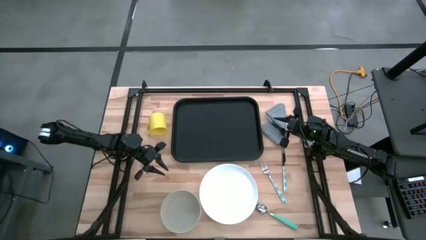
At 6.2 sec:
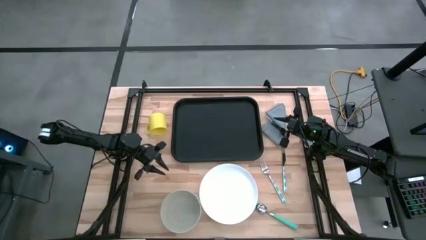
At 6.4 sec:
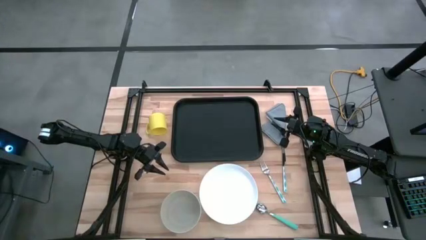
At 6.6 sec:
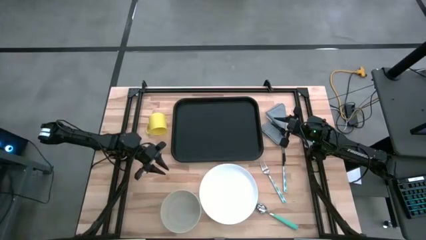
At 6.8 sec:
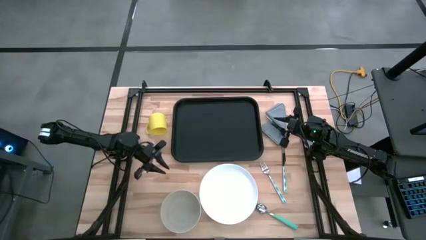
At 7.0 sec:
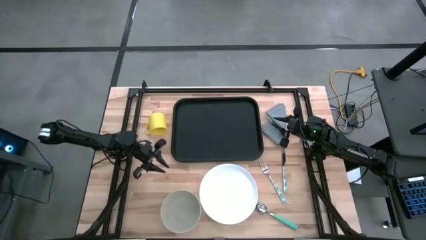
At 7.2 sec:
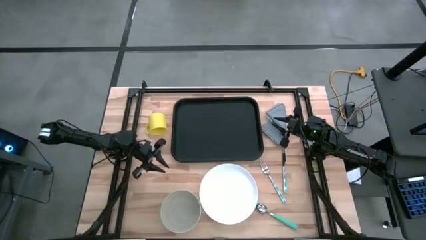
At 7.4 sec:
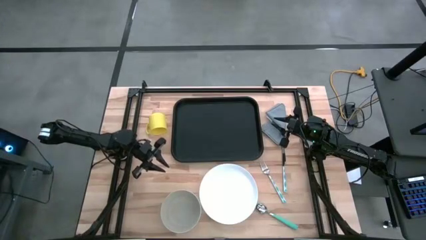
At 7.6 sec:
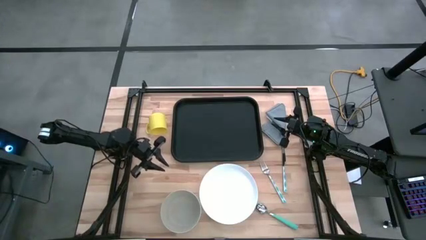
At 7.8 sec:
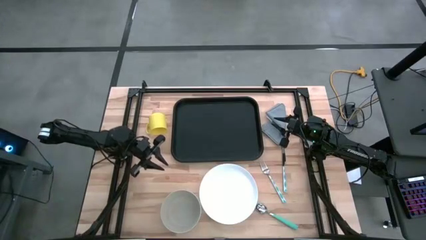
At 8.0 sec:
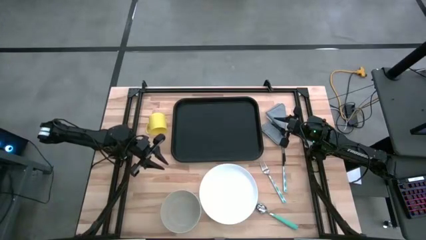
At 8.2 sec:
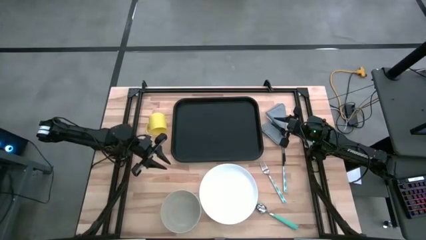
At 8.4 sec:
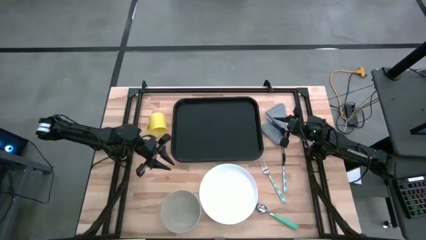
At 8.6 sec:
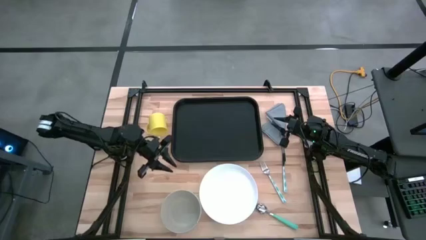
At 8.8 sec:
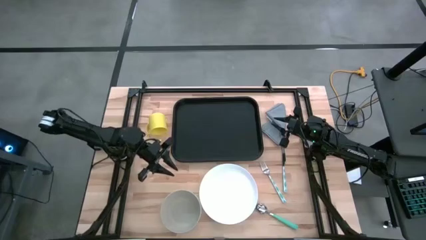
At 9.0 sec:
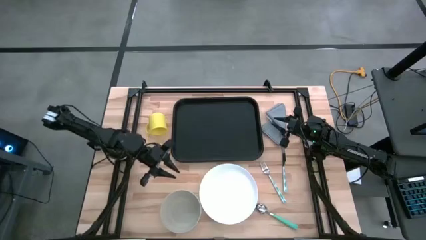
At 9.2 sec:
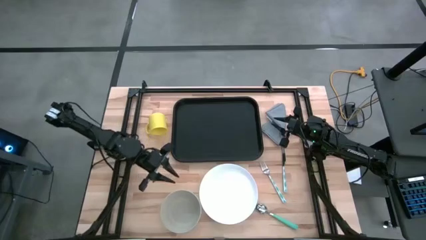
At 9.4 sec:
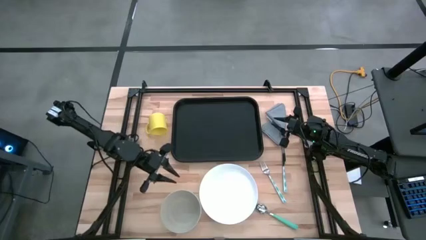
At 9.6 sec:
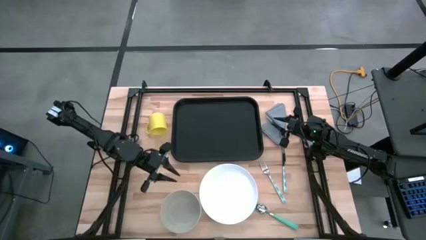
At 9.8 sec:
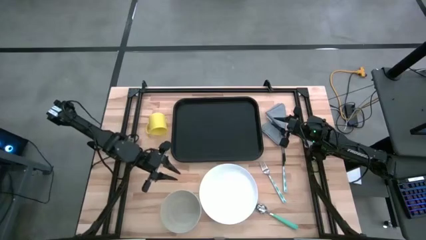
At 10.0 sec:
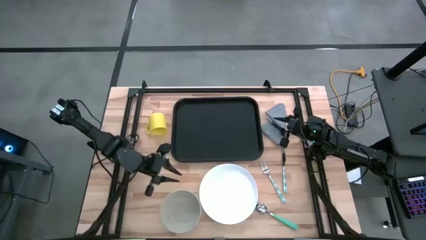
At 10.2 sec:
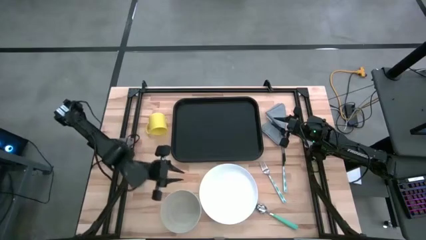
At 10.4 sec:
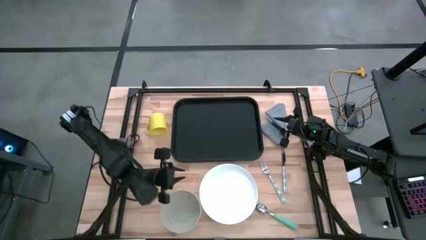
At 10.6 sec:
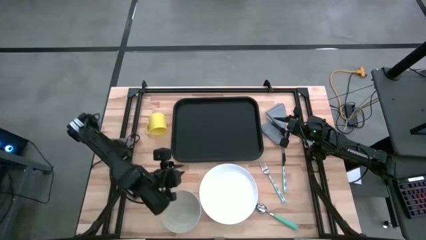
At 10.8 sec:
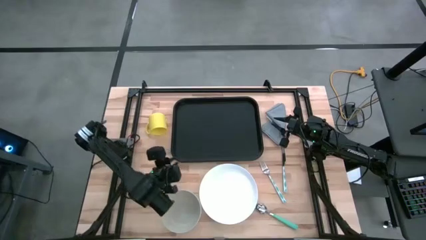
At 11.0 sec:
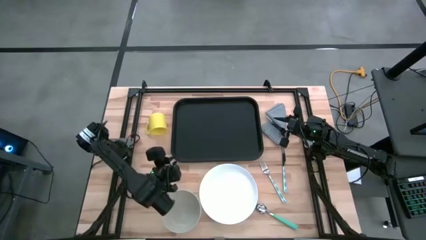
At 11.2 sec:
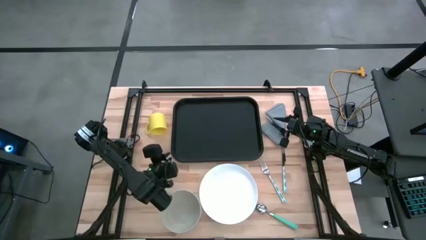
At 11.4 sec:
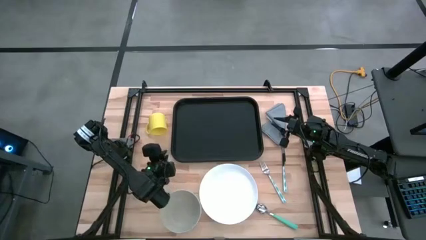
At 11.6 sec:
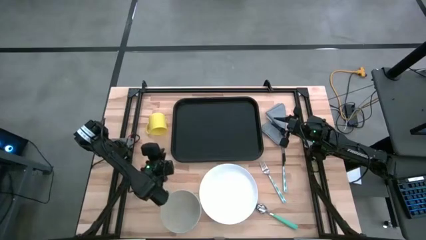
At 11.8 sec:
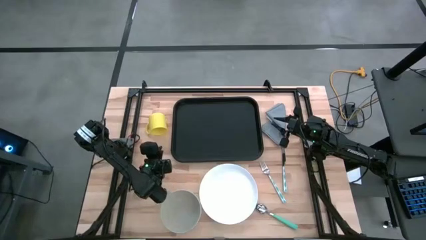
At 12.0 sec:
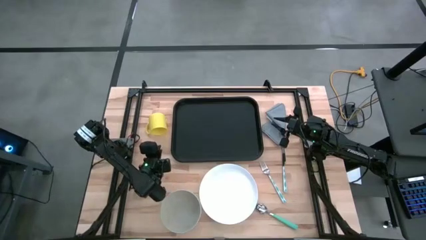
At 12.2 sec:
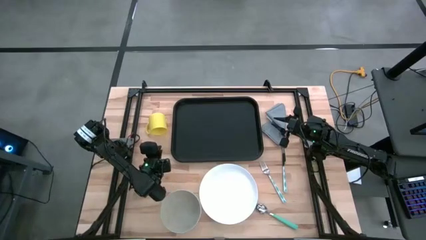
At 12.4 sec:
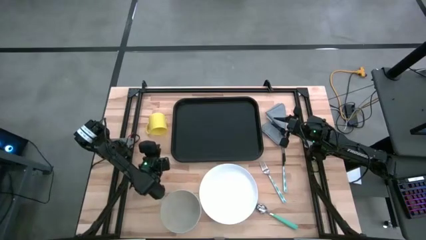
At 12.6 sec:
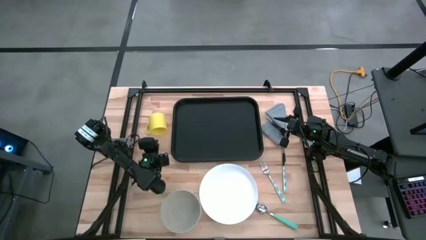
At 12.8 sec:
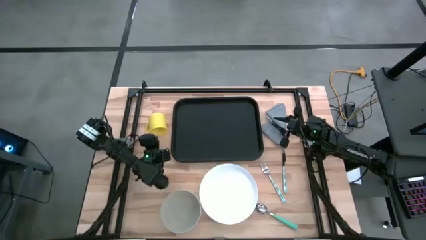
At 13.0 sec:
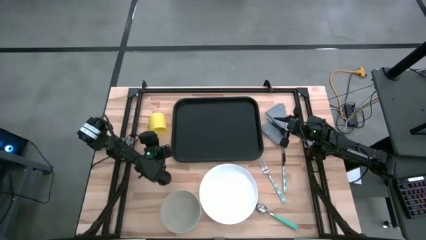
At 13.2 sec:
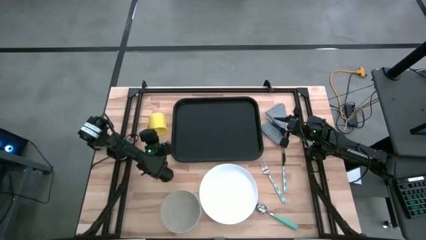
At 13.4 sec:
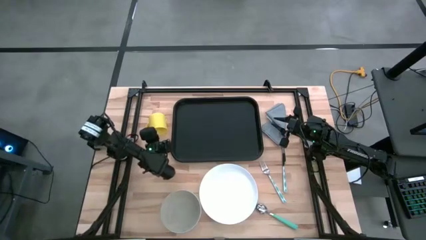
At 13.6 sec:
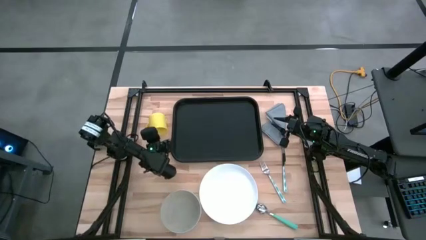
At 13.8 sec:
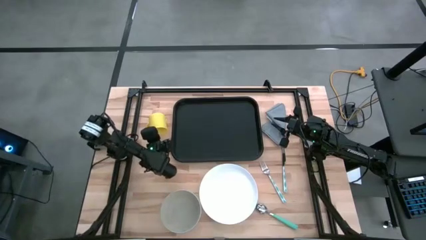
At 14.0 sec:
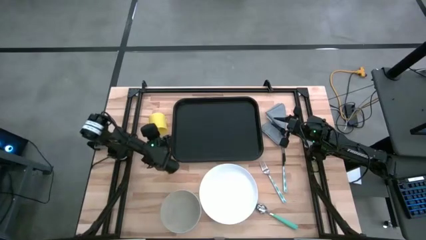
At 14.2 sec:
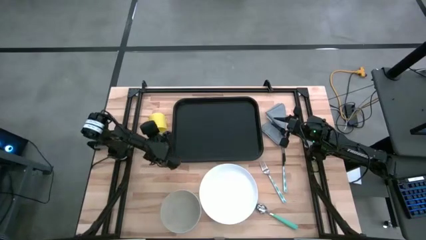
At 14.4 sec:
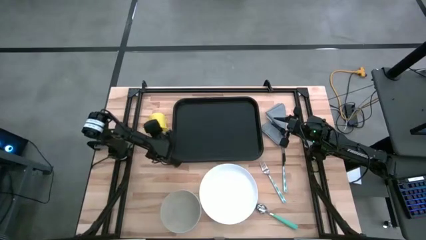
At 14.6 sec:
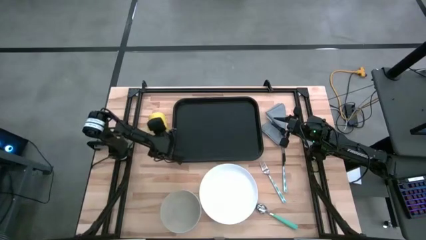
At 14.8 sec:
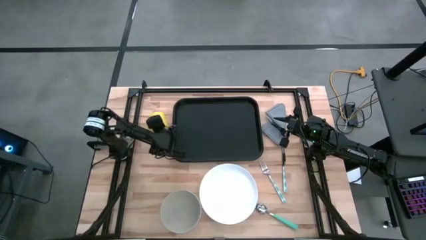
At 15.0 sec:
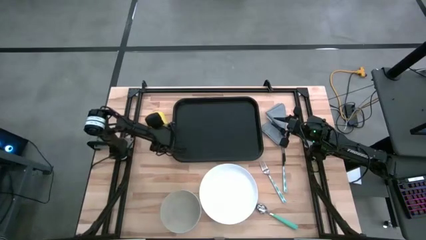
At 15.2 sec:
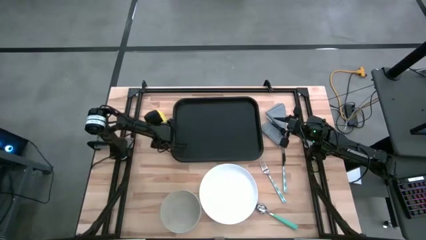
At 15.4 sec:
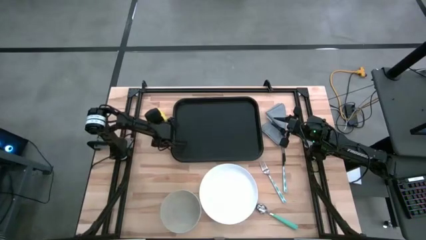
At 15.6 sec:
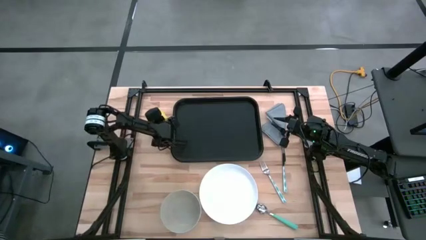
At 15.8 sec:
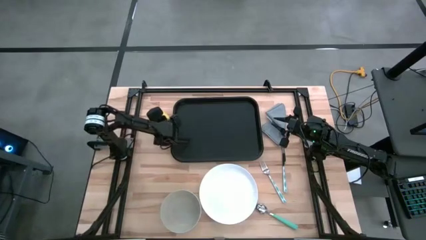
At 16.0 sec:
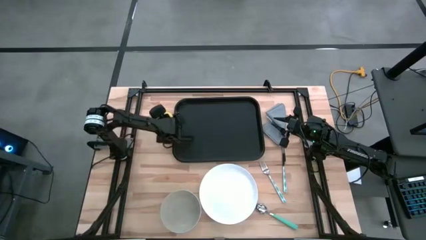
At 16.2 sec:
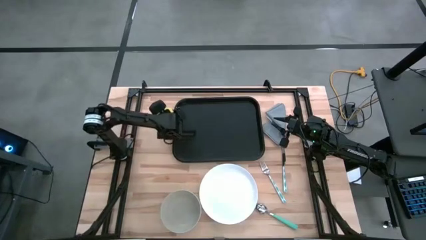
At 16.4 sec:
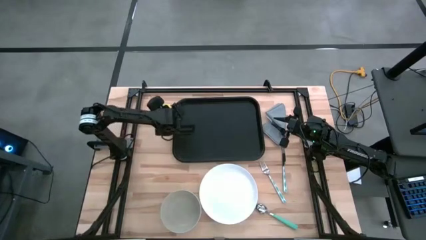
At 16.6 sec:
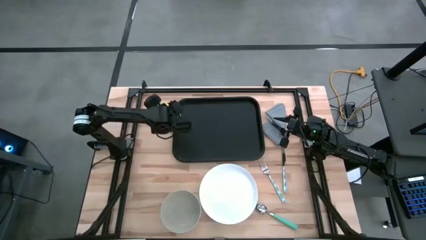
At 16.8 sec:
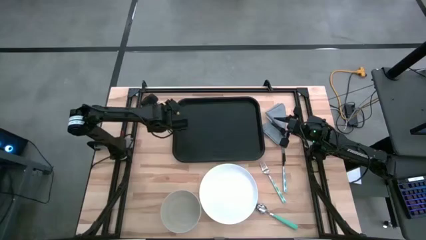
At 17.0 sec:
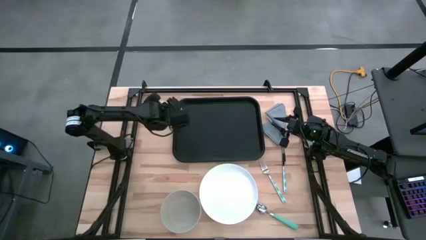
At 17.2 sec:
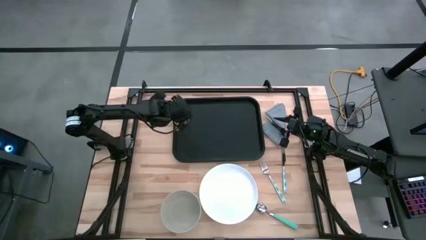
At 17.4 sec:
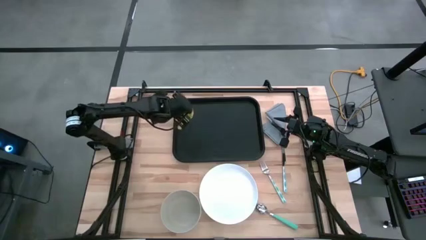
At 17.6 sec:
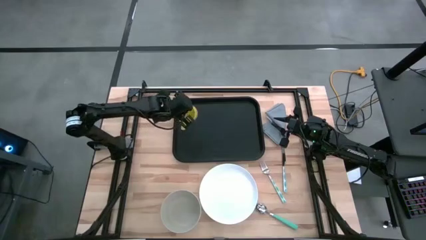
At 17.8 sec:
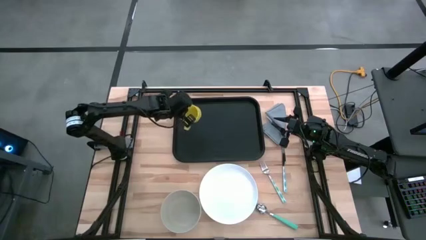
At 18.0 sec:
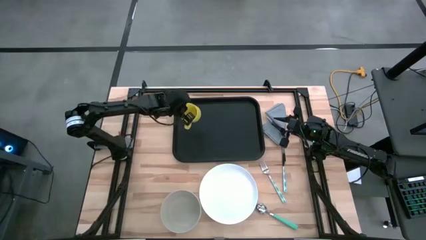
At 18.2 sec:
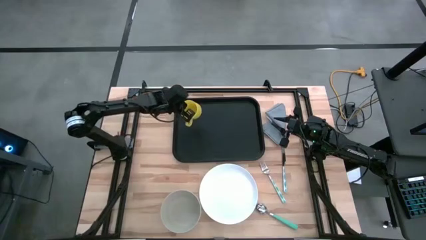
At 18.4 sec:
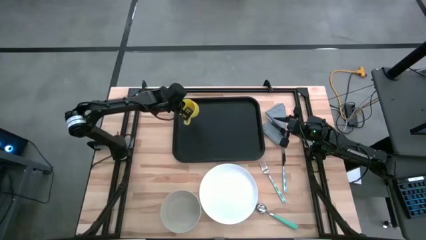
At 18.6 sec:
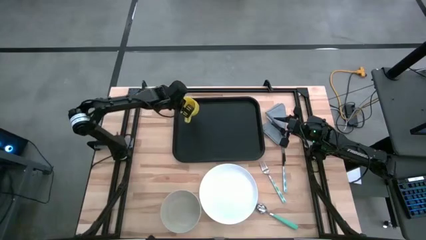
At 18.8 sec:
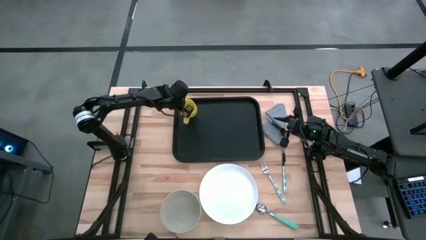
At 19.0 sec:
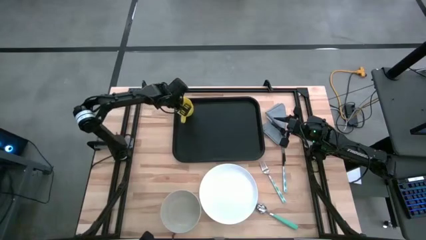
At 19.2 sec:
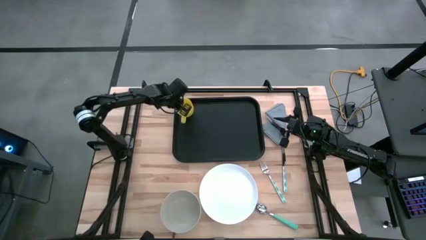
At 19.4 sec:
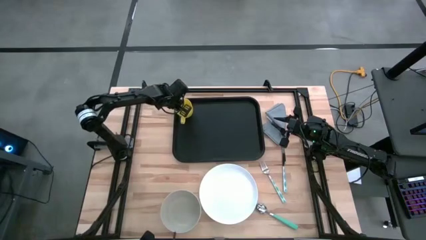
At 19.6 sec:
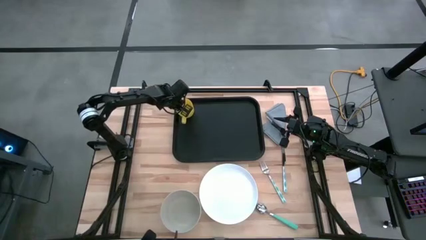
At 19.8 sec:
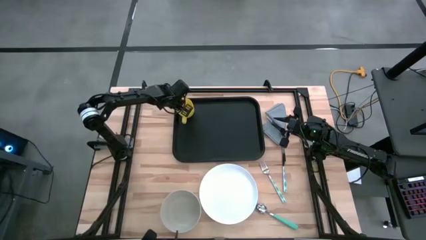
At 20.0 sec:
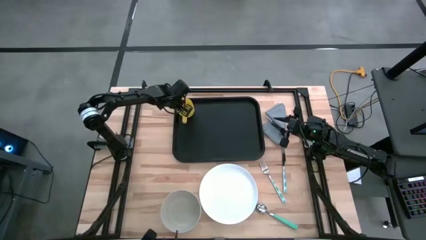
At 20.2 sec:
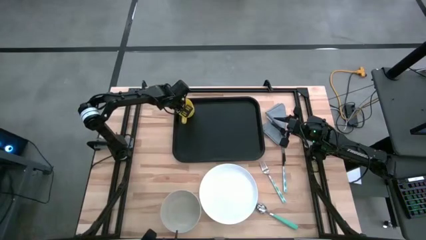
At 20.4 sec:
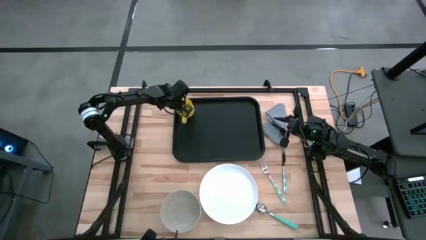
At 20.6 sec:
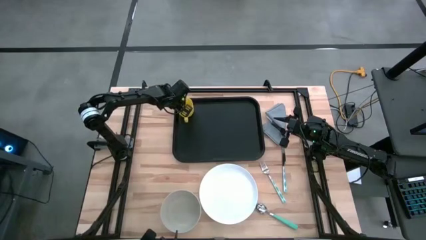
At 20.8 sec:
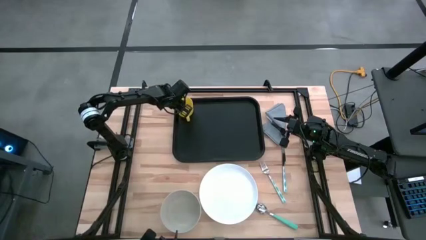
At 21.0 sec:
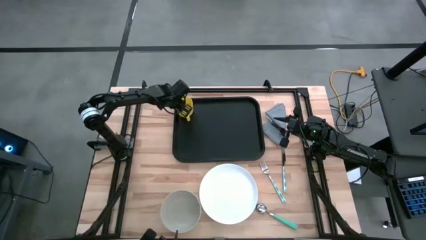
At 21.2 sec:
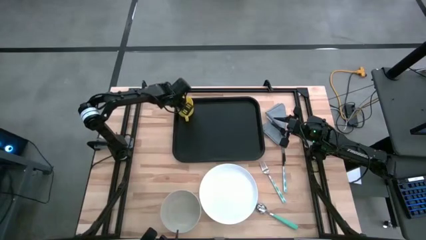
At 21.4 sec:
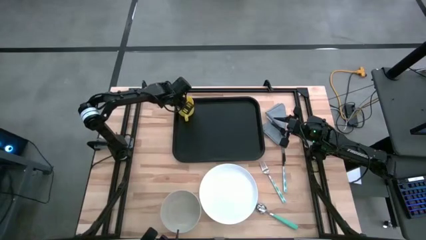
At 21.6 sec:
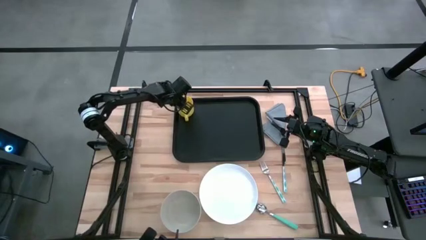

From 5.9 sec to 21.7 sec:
Task: Set up tray
Put the yellow mug on the top left of the black serving tray
